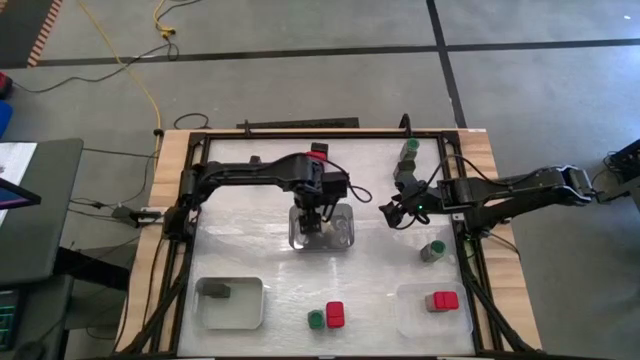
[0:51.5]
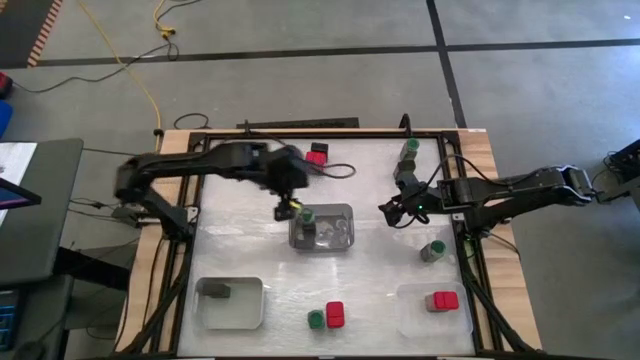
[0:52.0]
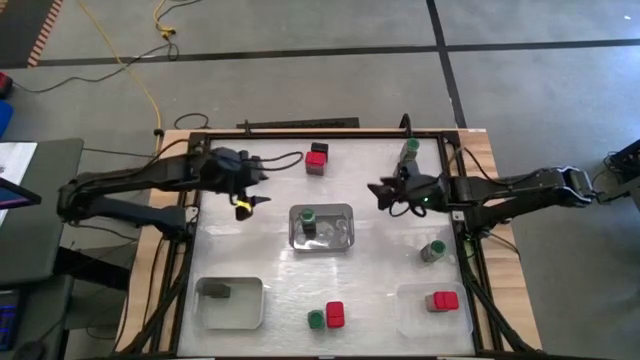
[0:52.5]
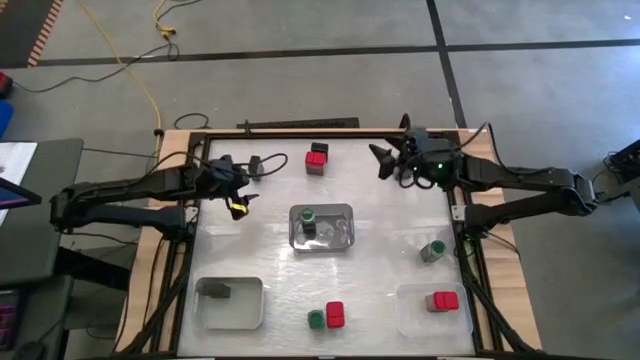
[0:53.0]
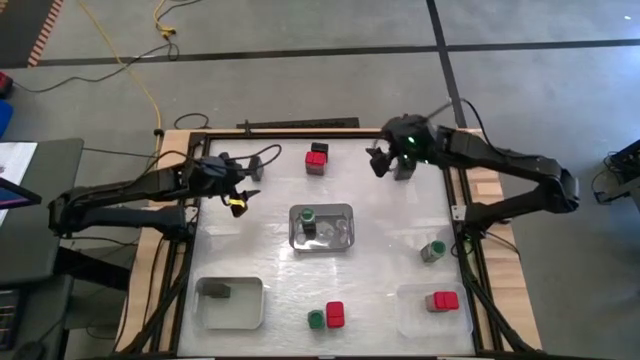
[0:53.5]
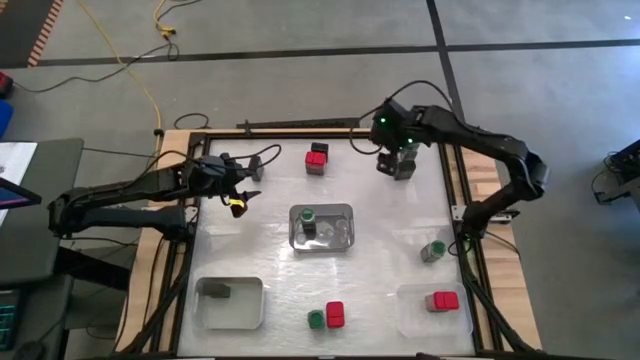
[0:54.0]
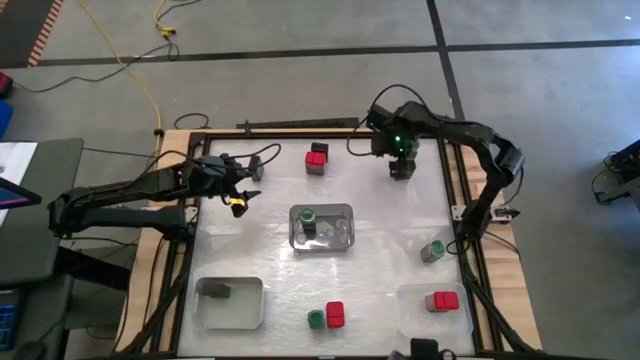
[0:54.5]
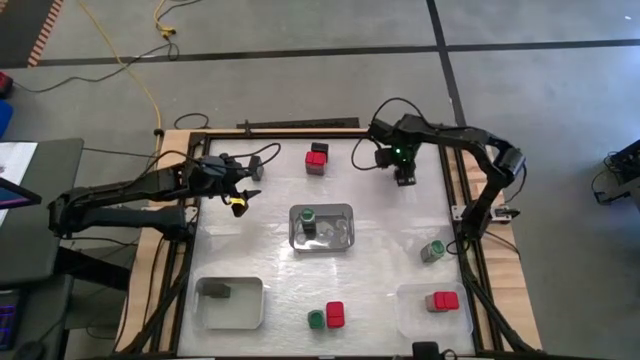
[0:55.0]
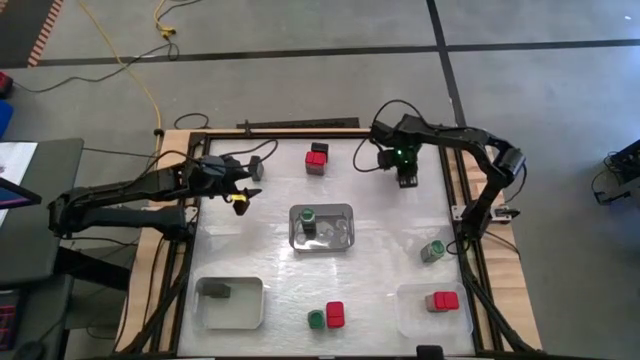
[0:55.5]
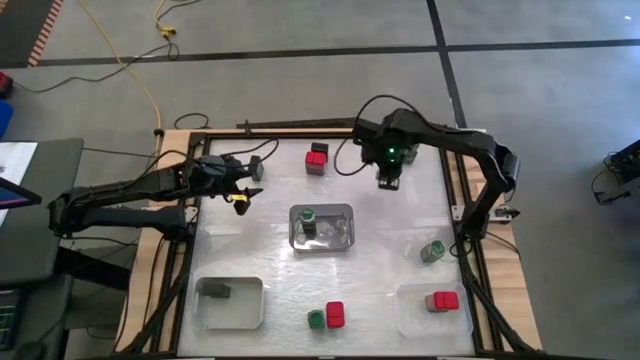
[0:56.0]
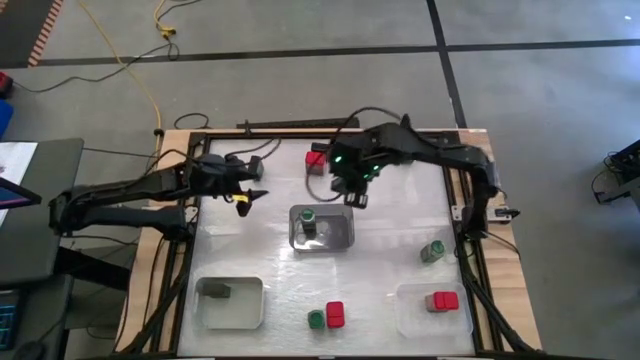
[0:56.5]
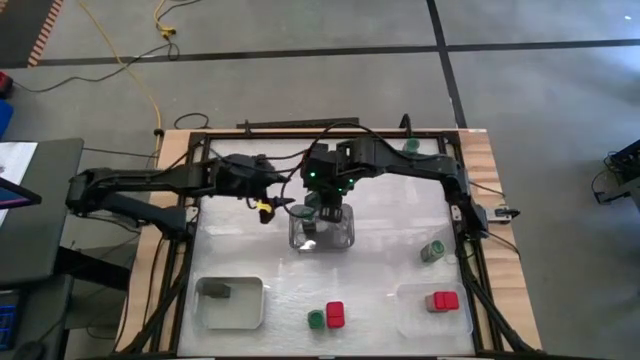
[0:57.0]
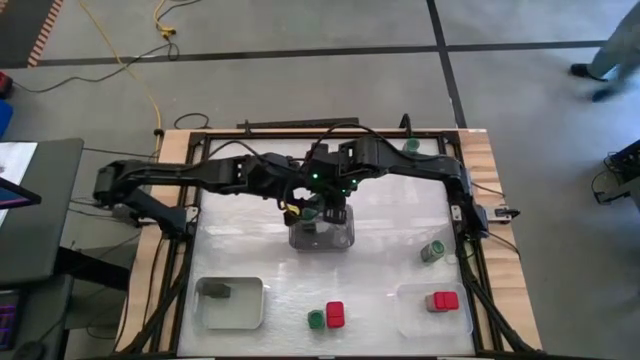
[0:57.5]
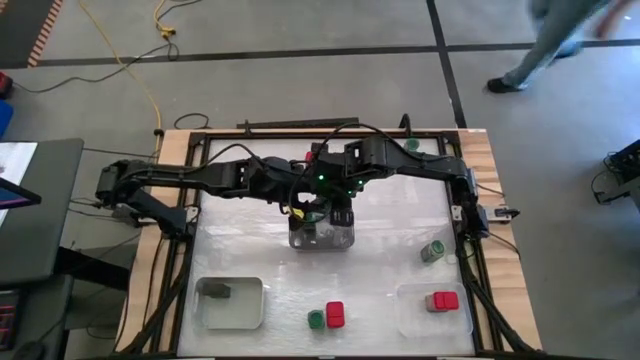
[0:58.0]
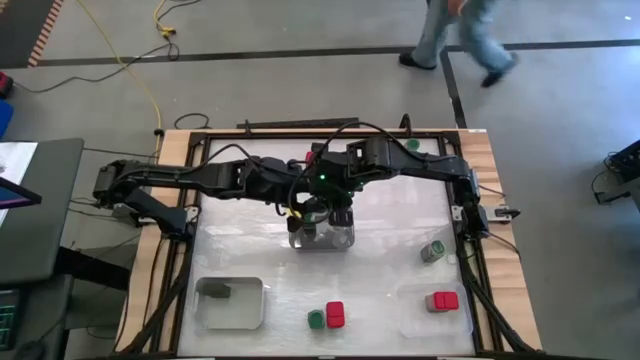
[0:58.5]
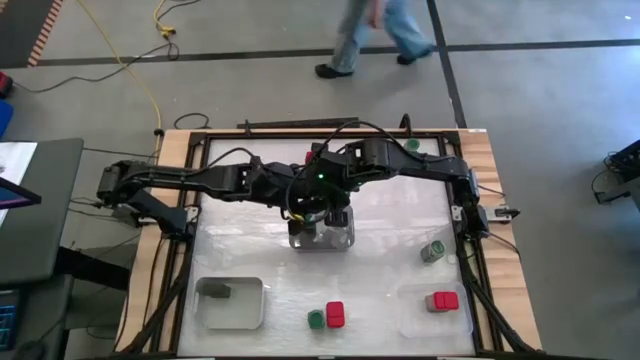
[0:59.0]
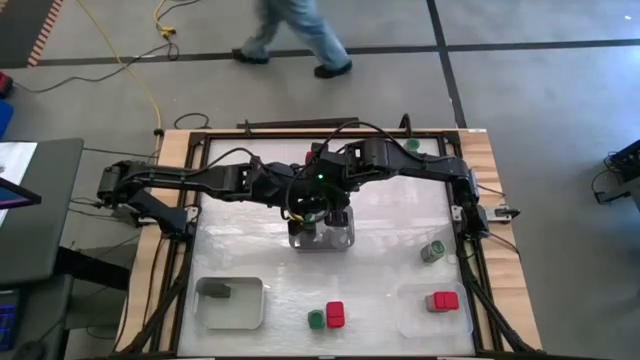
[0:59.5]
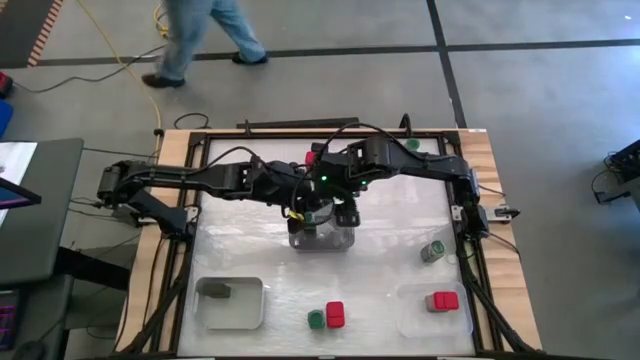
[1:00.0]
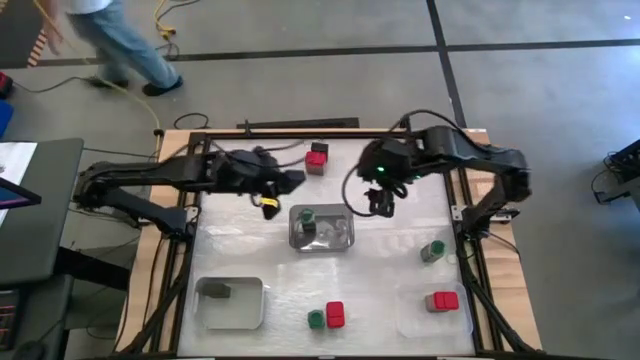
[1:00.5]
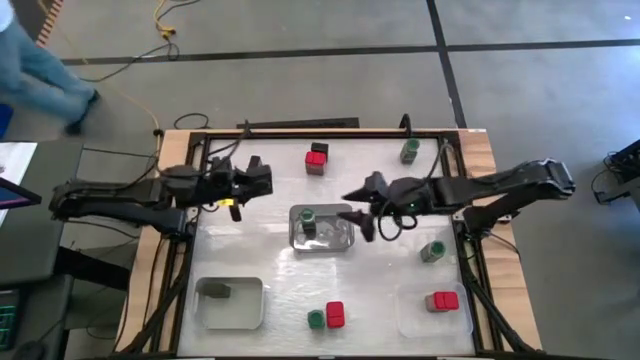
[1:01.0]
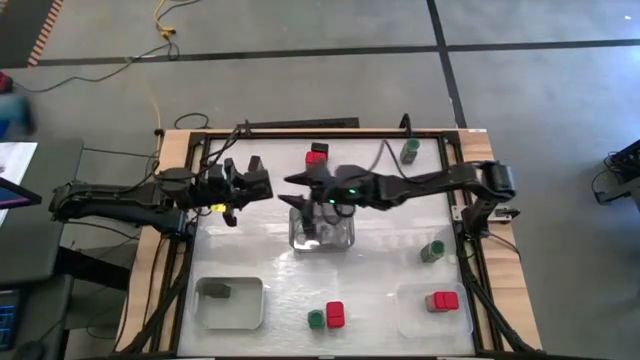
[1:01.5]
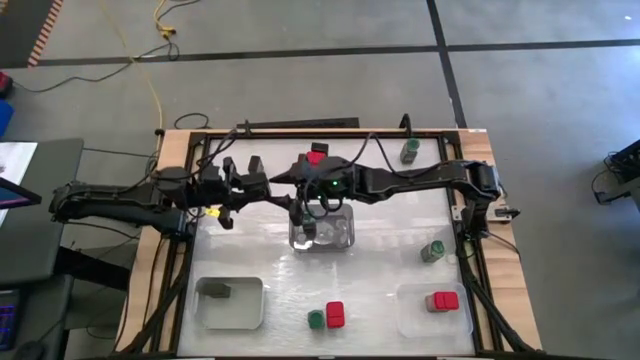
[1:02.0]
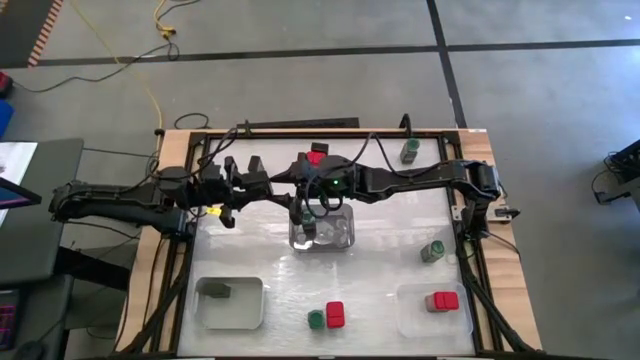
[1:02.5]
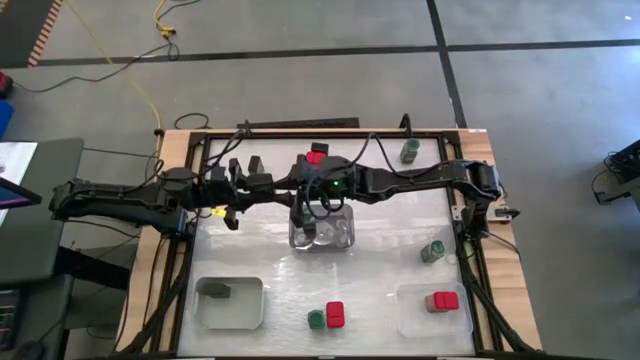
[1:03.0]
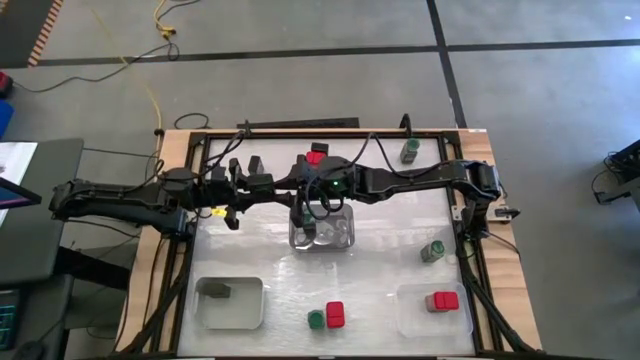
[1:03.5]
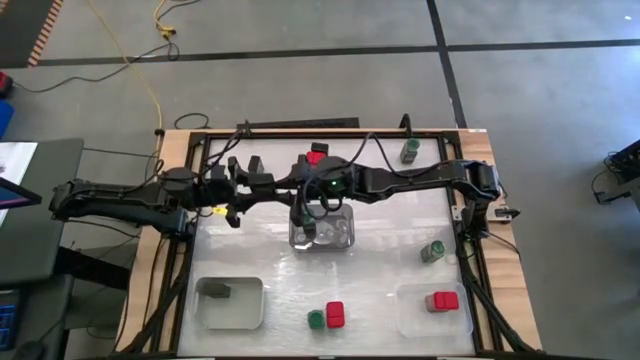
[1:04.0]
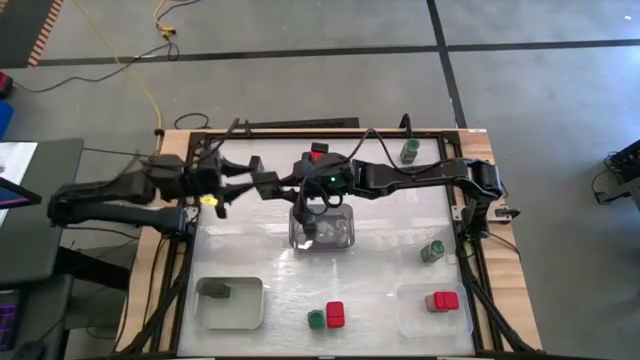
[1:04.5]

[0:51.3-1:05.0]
Task: Sort spices by type
Put the right black seasoning can into the grey bin

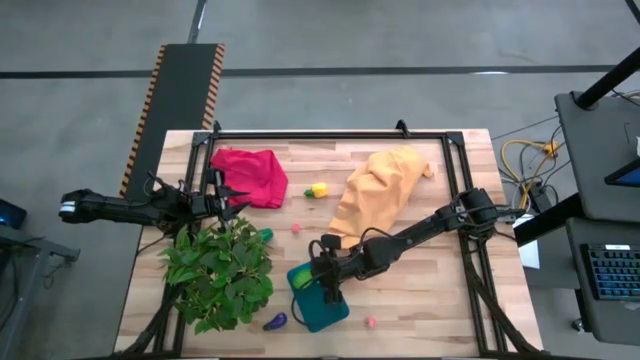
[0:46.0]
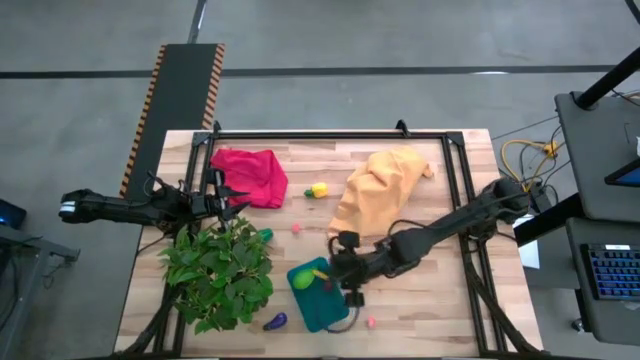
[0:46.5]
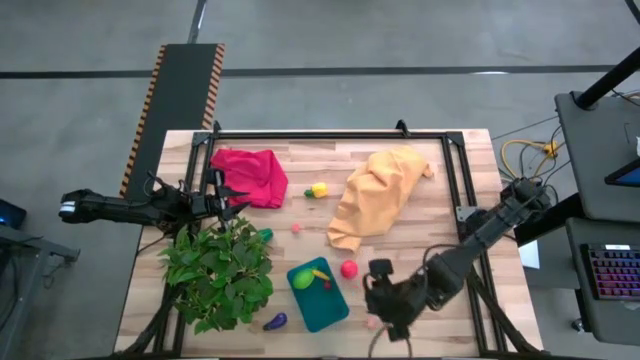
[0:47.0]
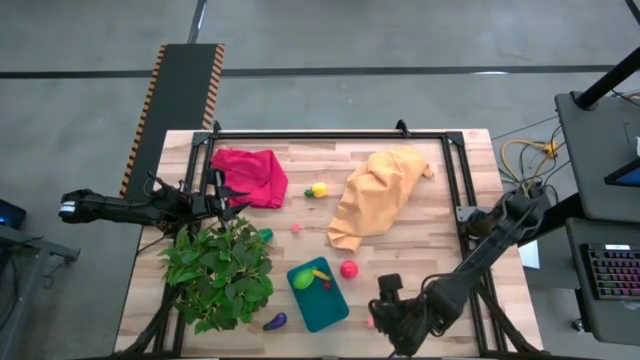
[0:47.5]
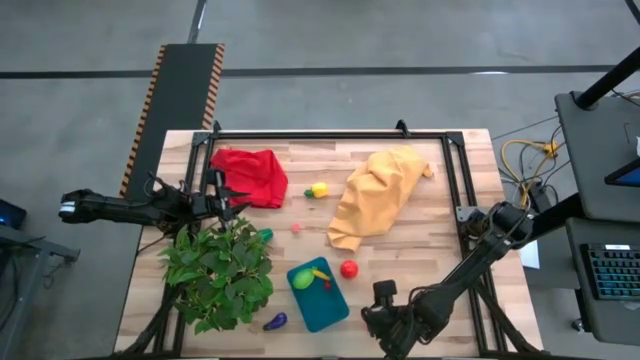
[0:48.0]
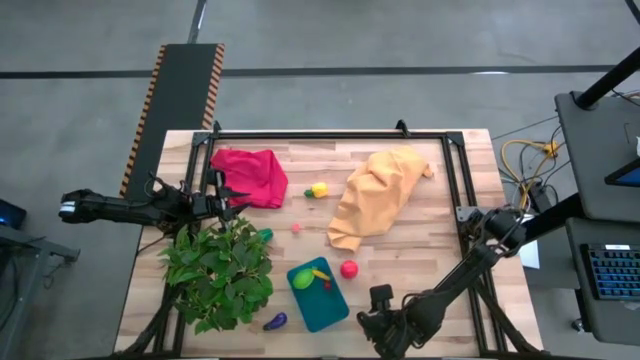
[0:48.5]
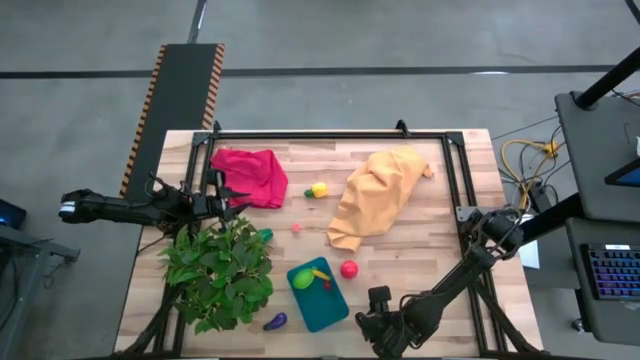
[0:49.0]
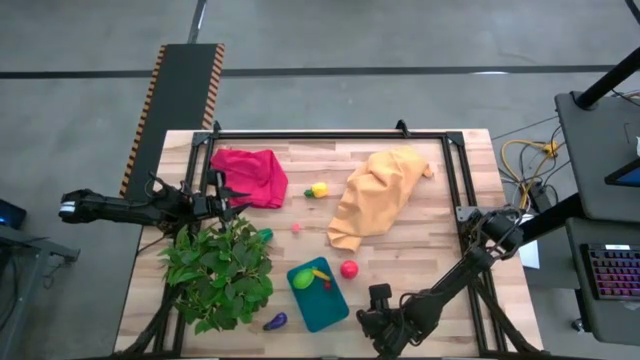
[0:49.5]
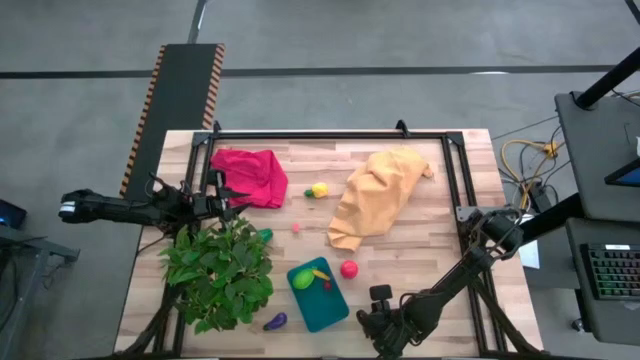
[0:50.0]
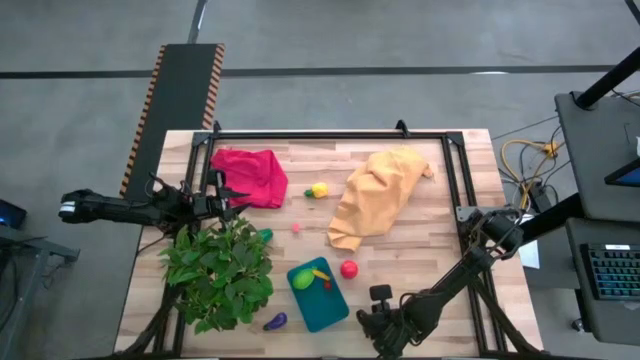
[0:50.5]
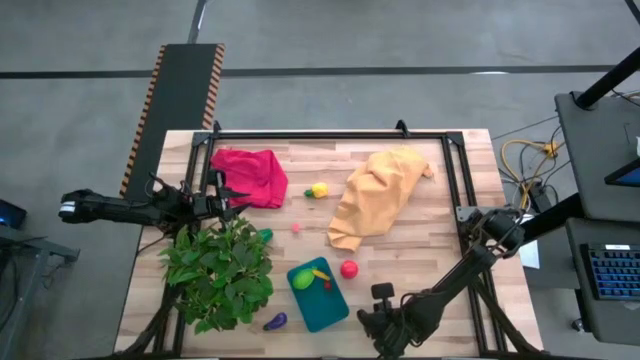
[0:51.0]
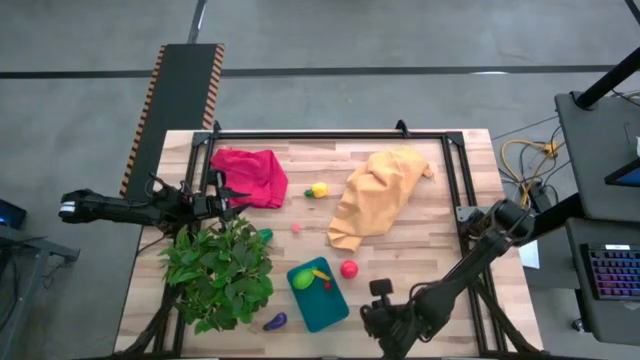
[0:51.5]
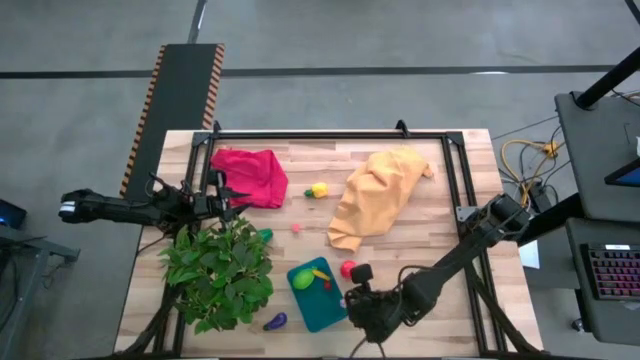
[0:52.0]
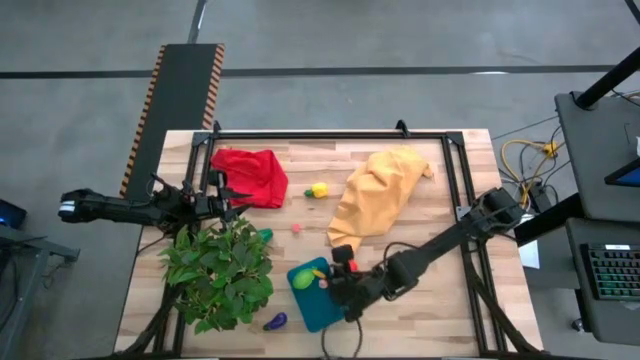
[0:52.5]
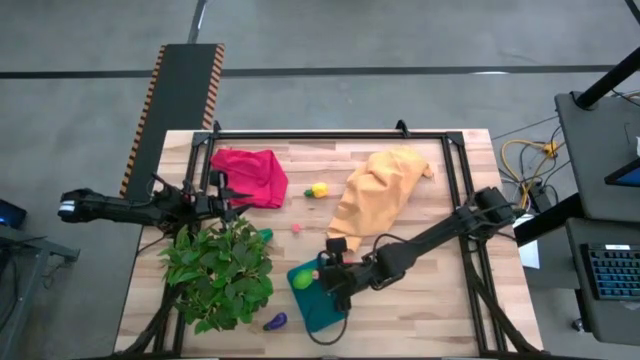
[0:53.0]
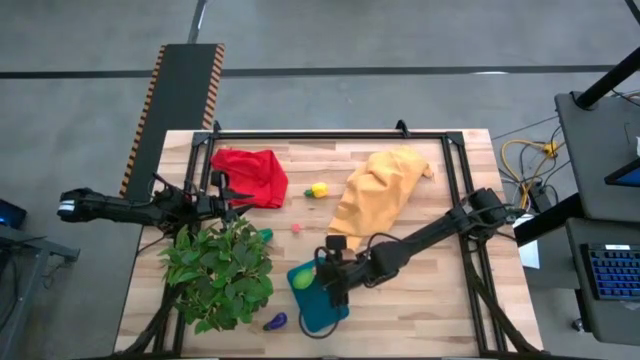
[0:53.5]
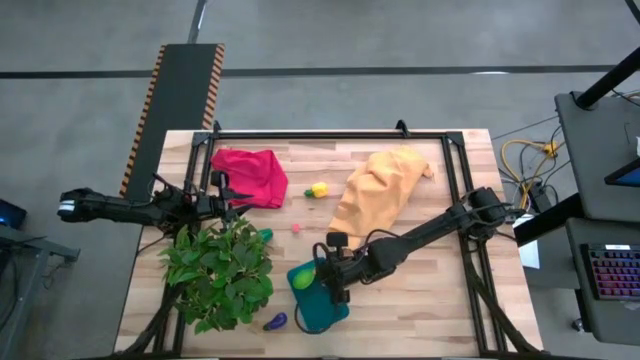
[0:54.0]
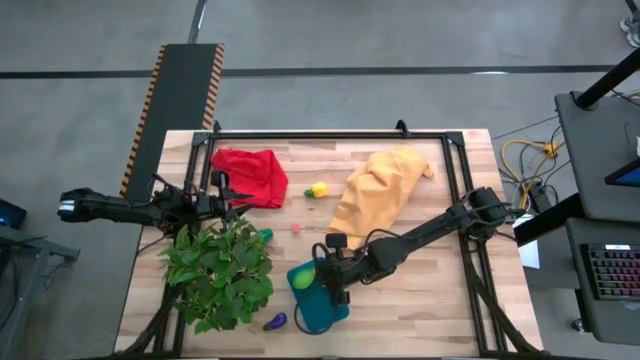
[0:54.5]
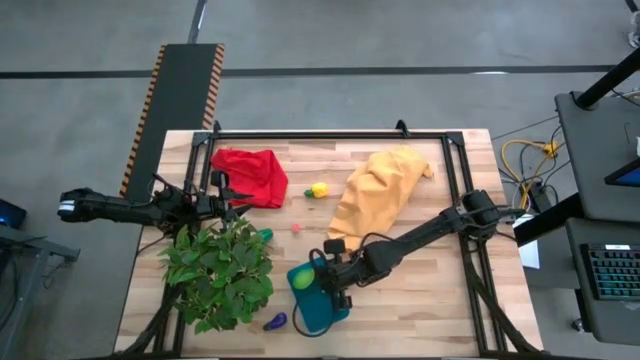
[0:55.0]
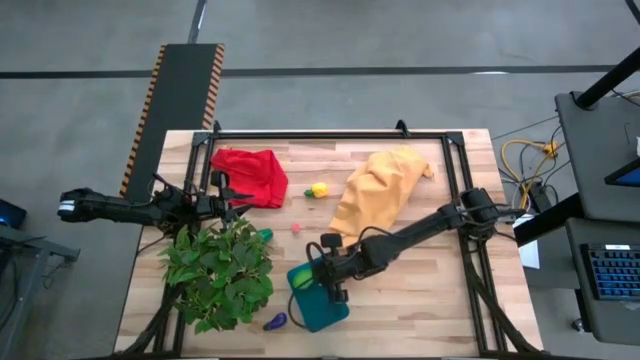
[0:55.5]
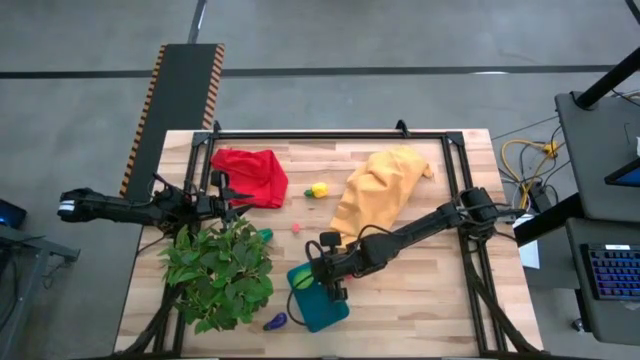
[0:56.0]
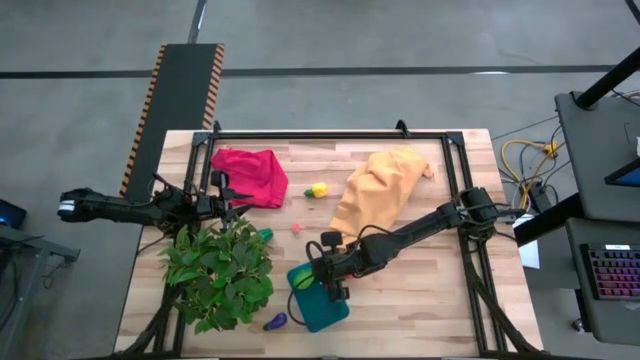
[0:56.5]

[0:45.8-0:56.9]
Task: Pick and placing Produce into tupperware
Put the bottom peach into the bin
